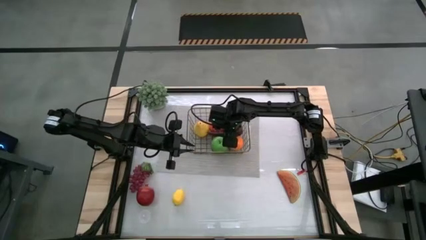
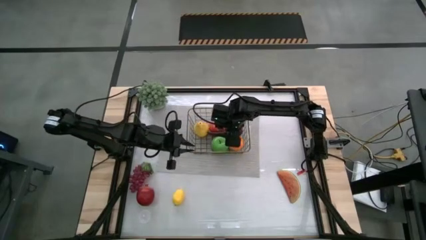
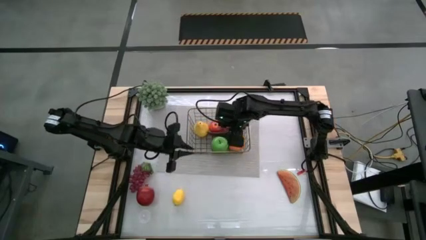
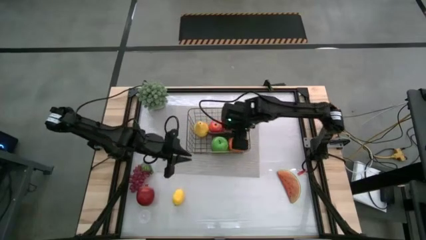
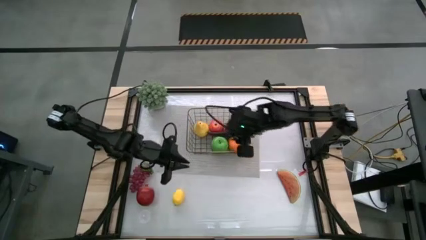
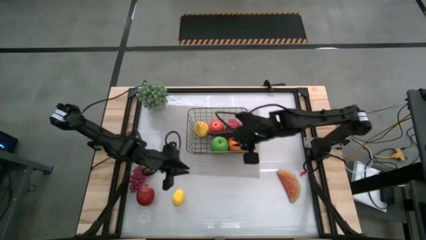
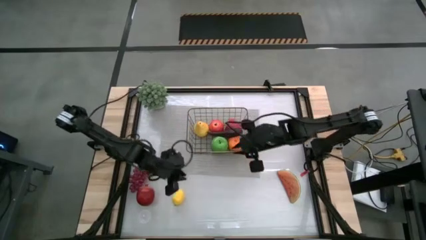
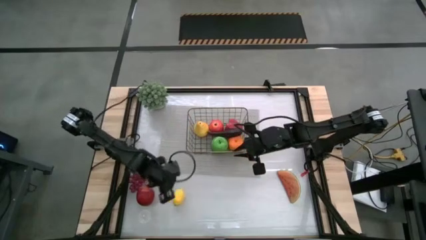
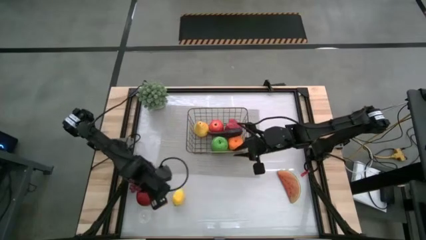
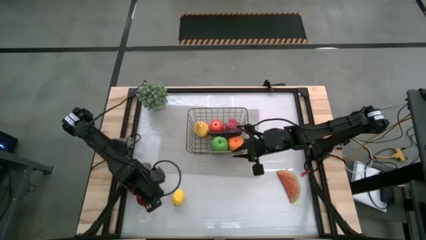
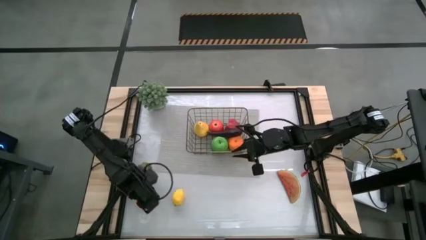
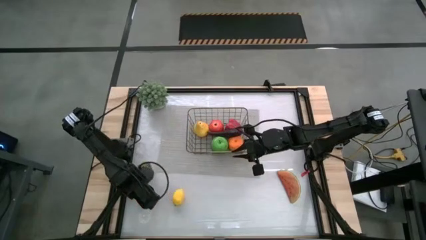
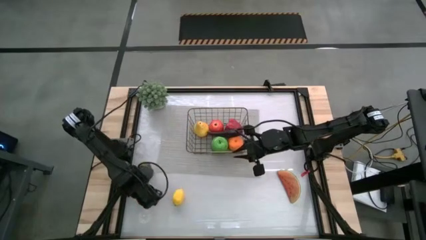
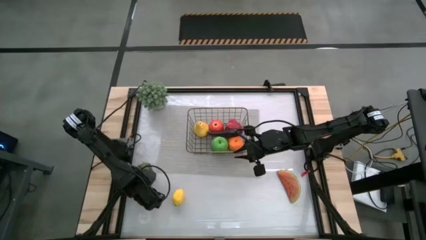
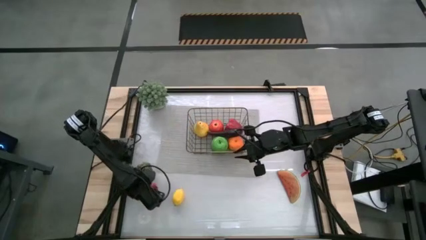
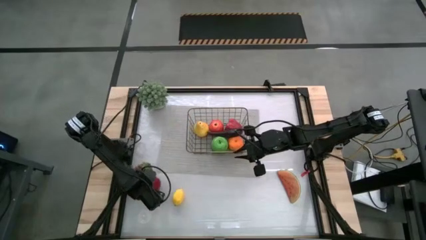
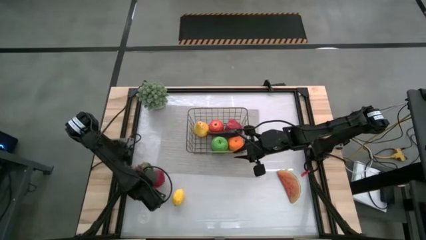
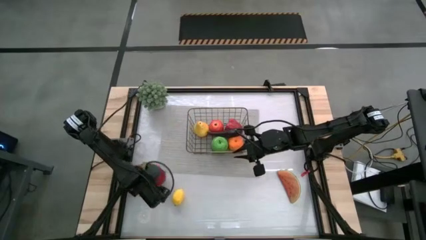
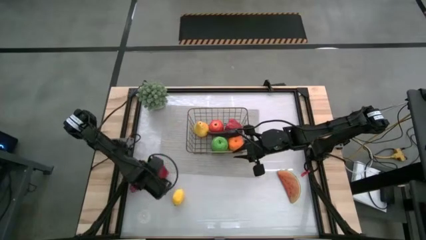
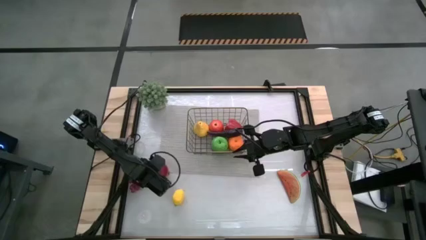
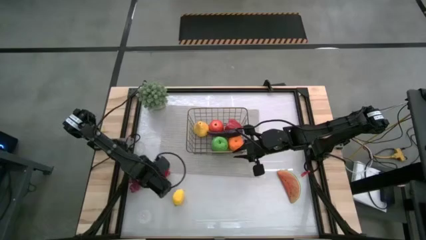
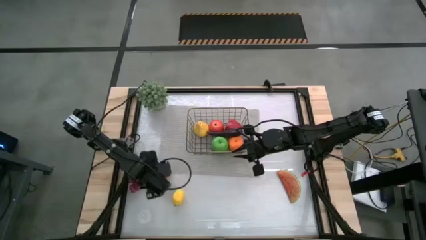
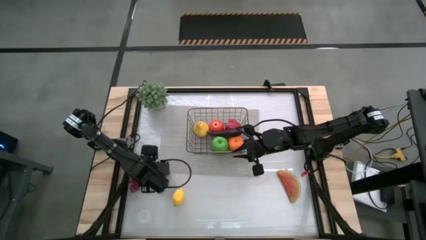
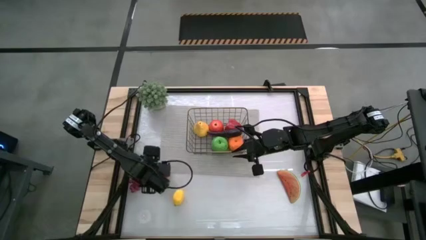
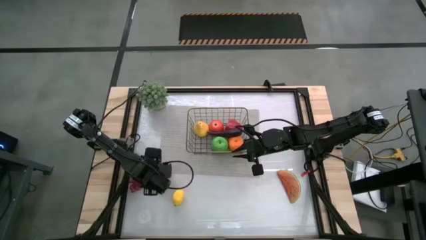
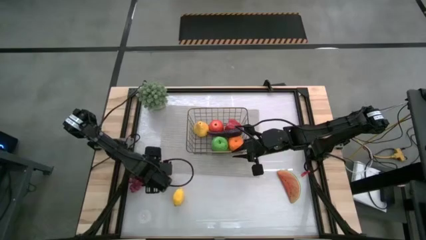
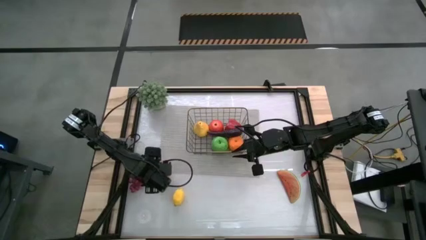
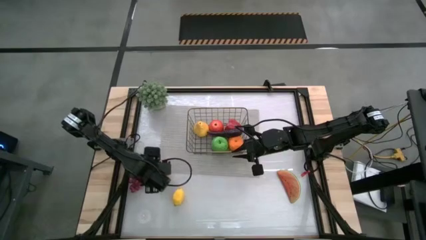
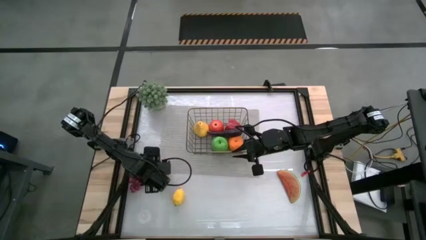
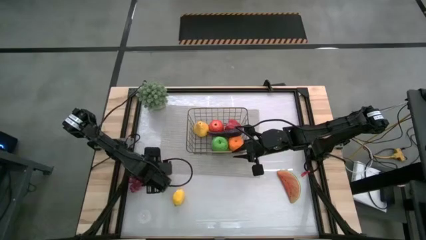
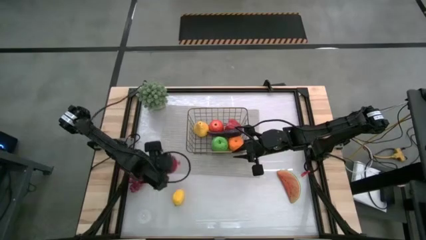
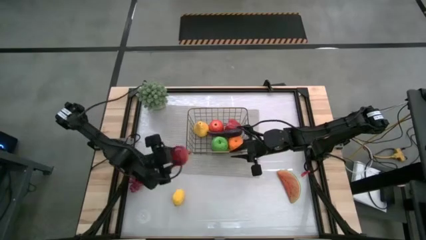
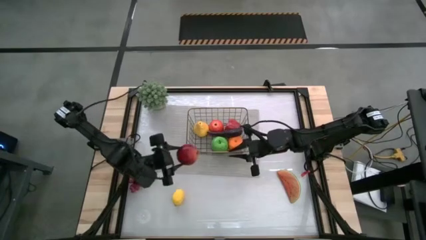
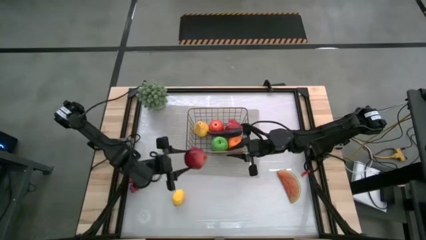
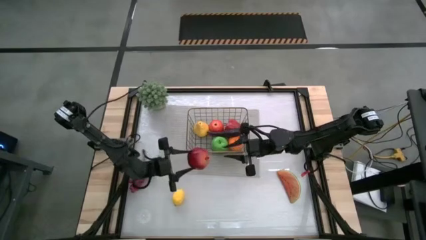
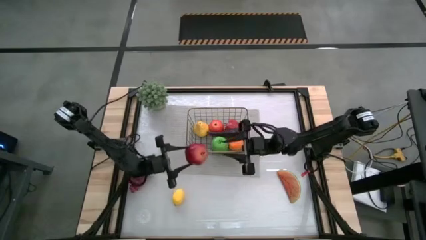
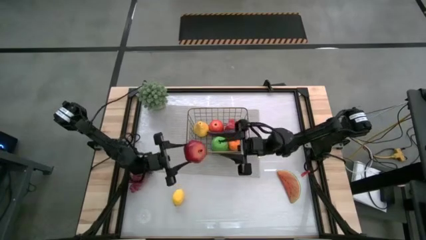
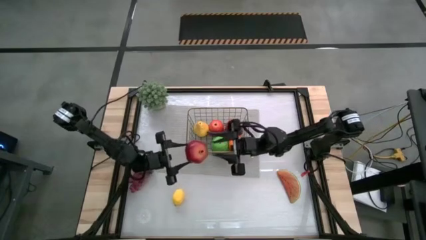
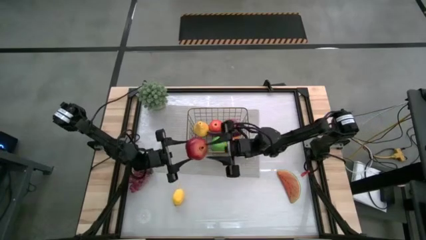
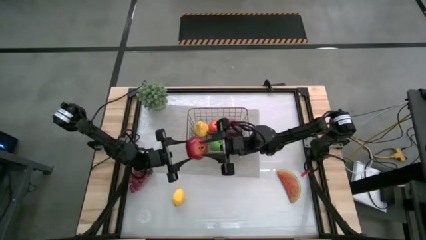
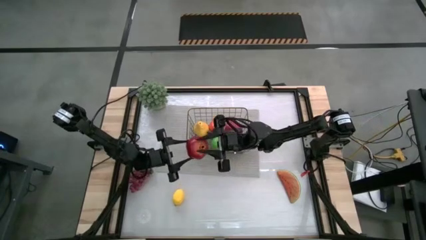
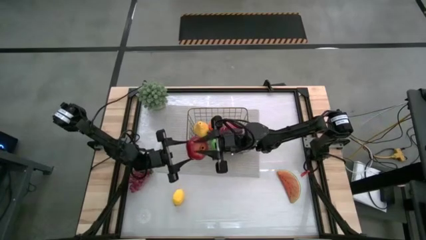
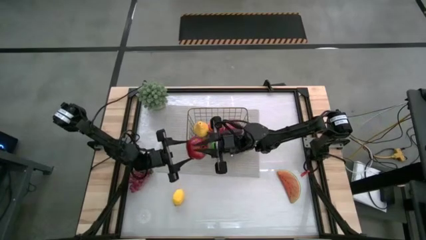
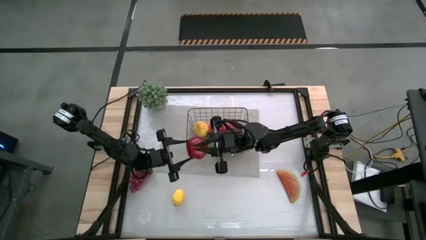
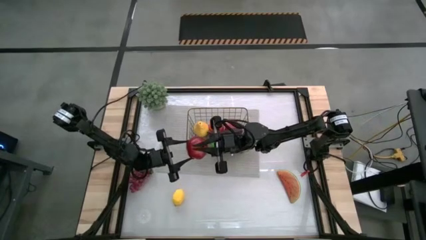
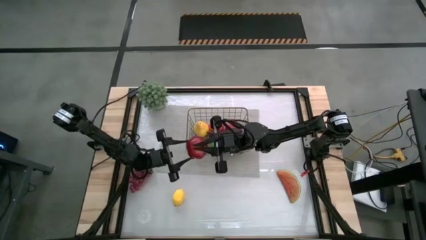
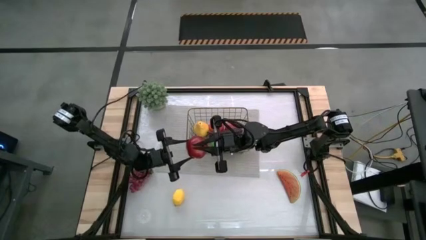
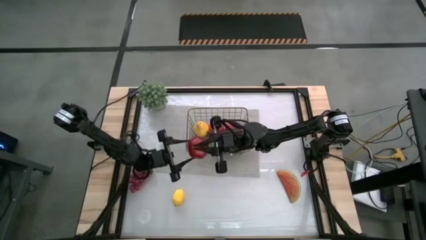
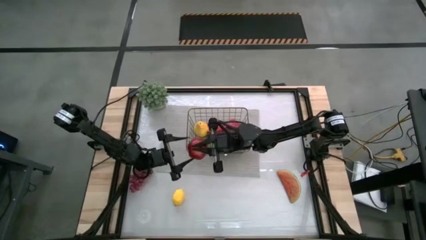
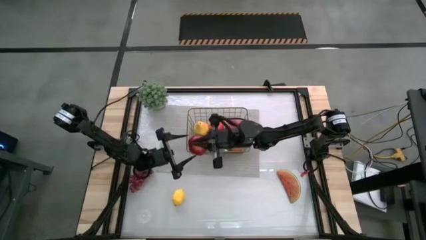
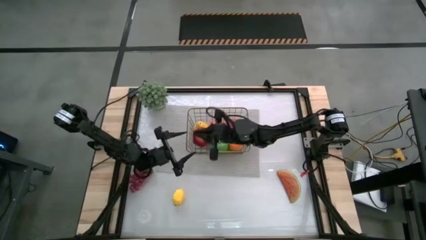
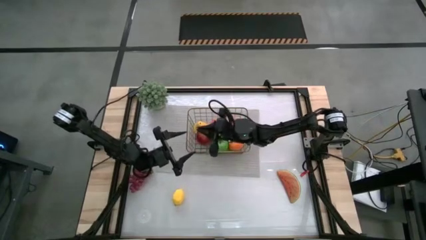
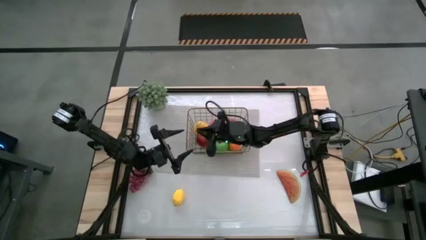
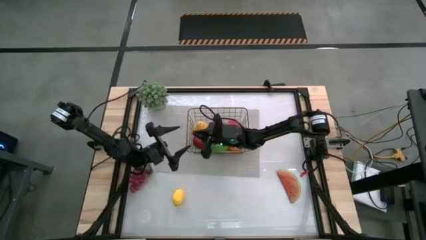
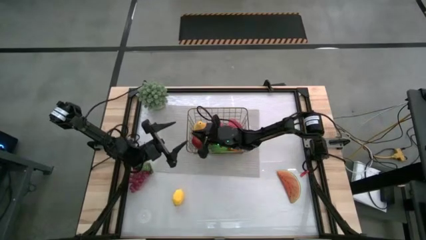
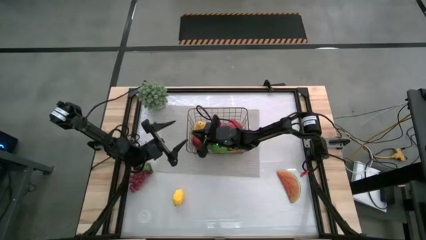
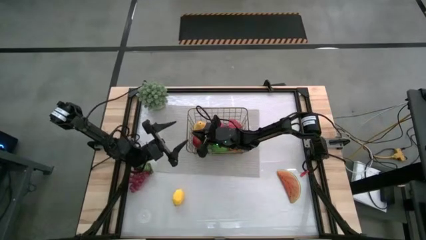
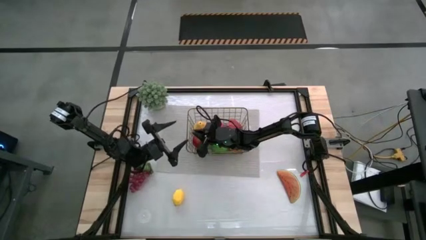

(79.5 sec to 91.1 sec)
Task: Build produce basket
Put the pomegranate into the wire basket

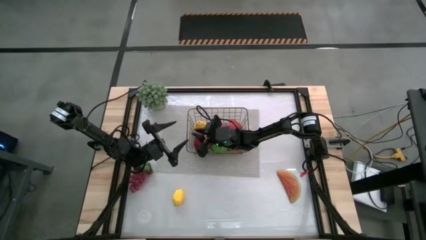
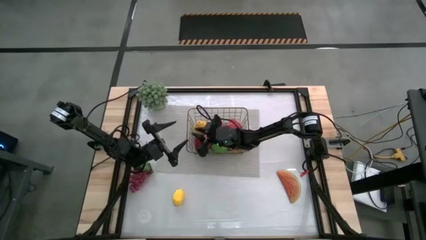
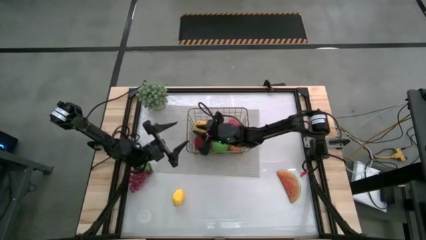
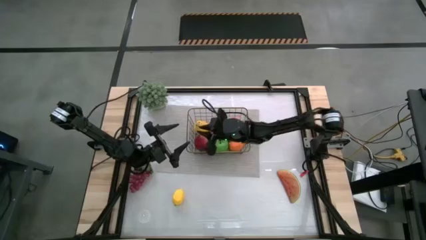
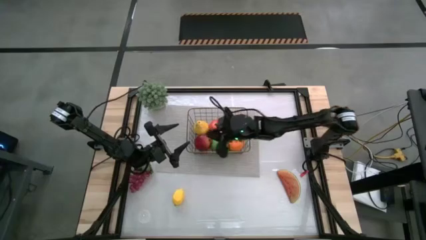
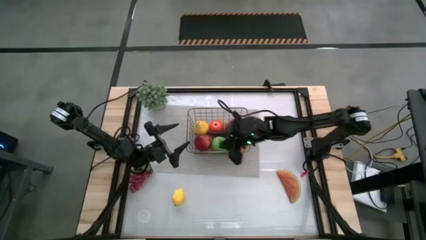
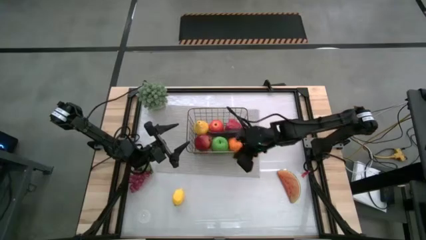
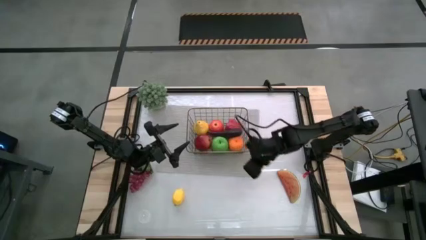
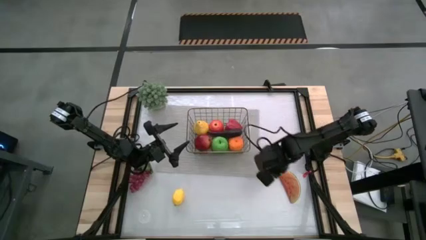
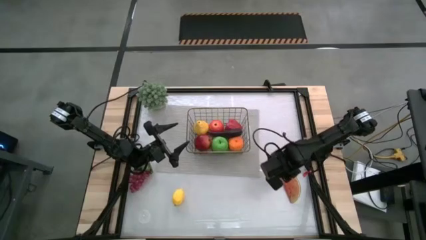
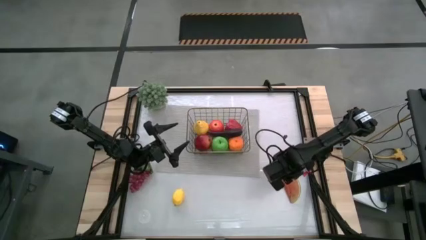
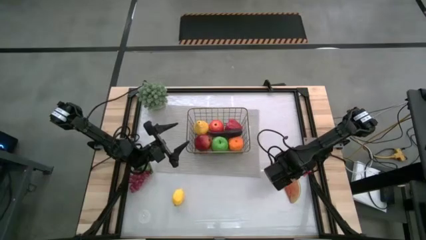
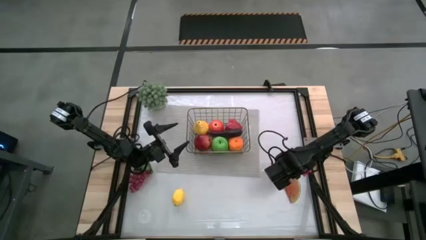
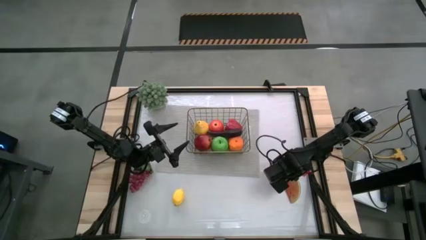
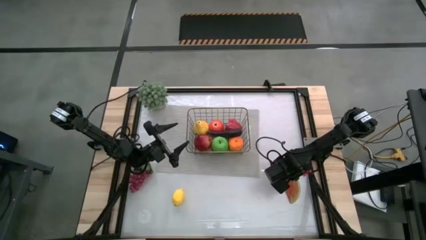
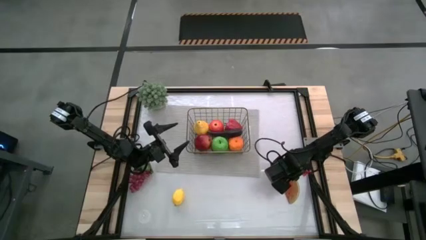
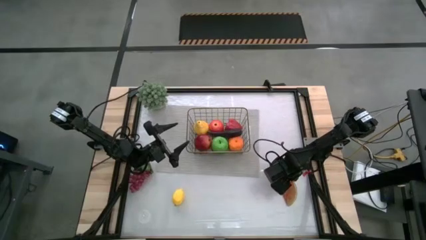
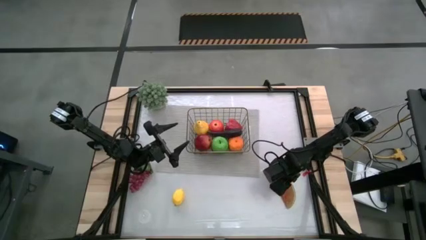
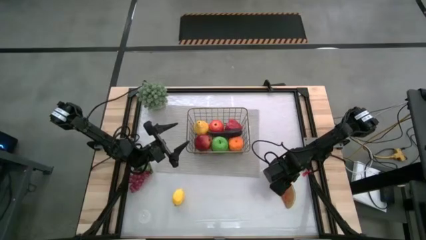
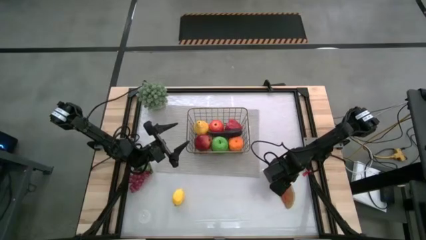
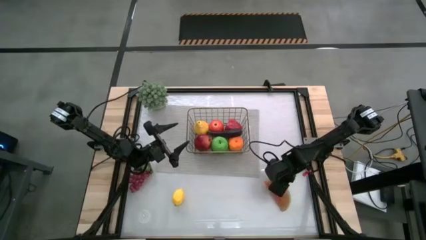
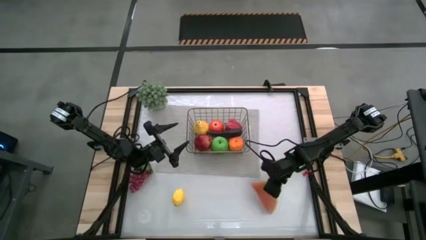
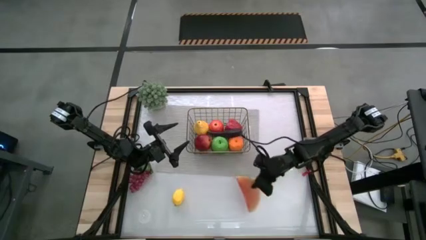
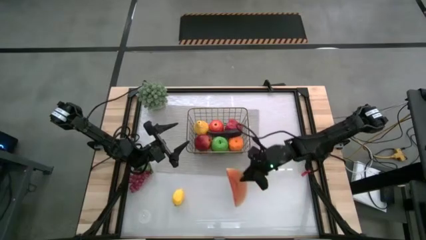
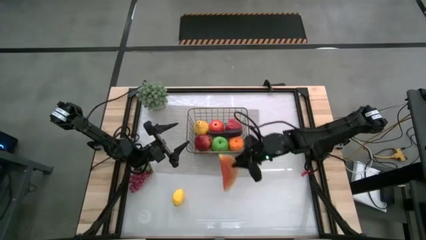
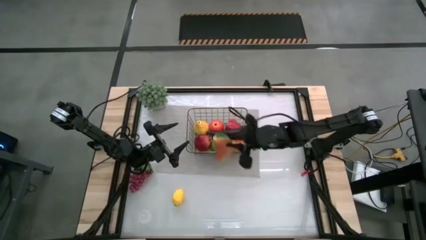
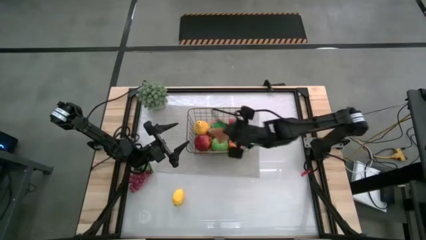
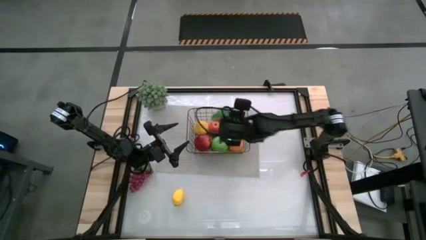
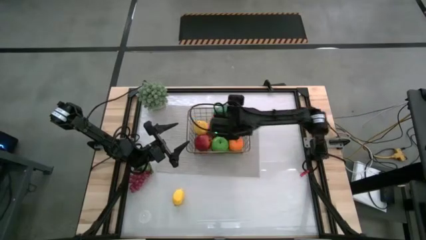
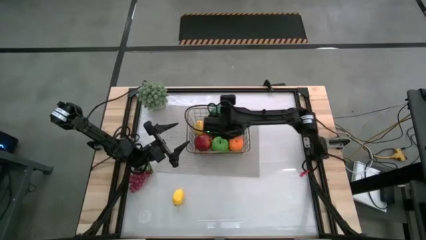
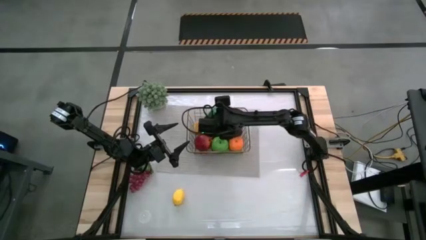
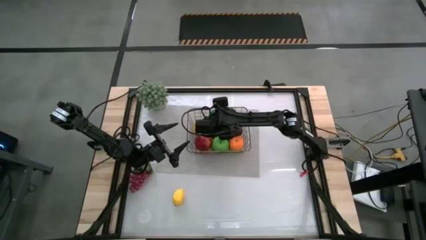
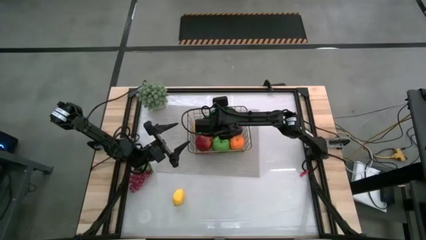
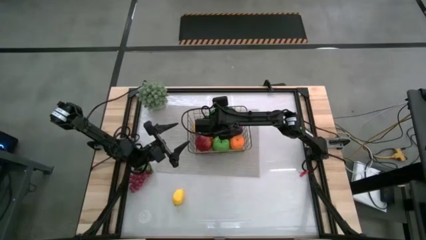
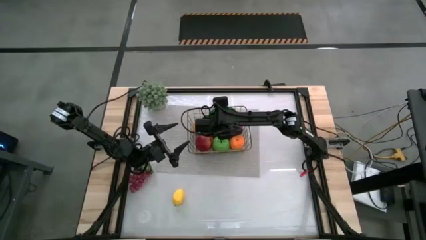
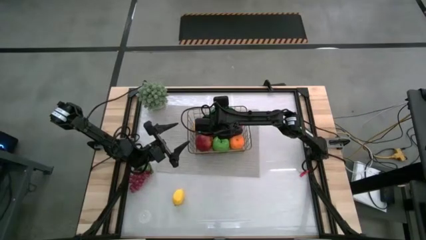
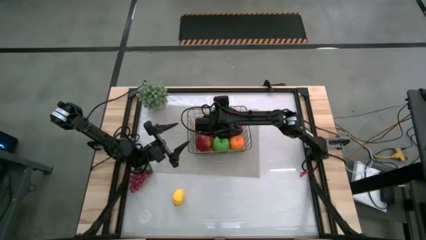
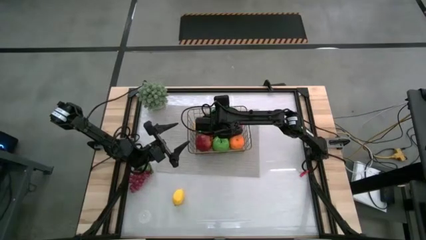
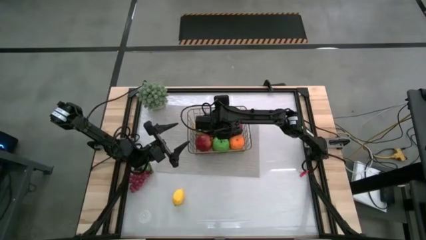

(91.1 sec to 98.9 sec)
Put the sliced watermelon into the wire basket
